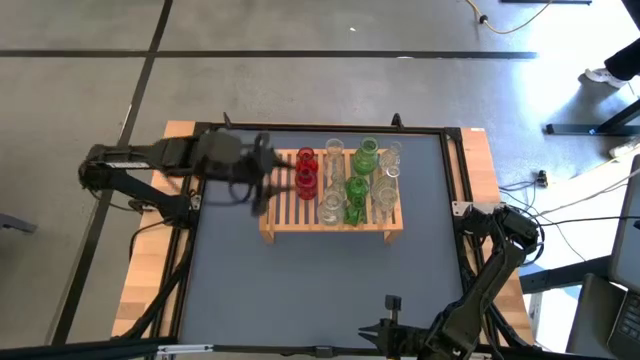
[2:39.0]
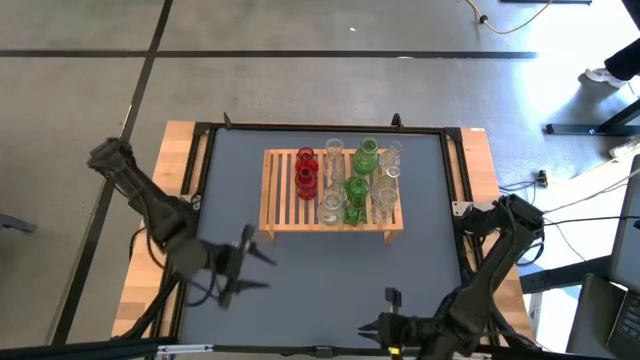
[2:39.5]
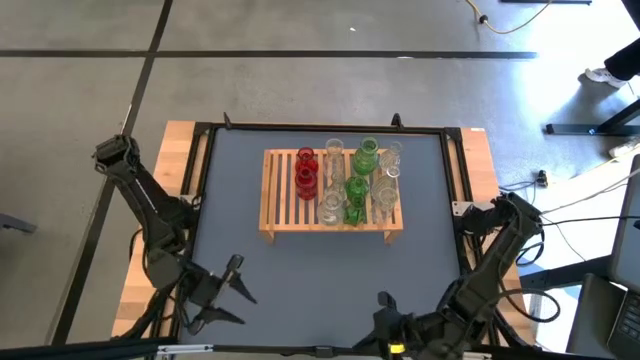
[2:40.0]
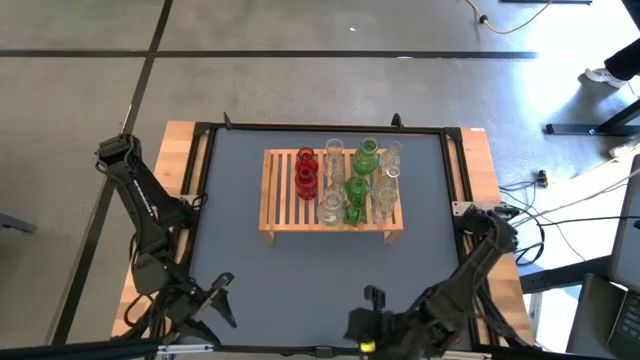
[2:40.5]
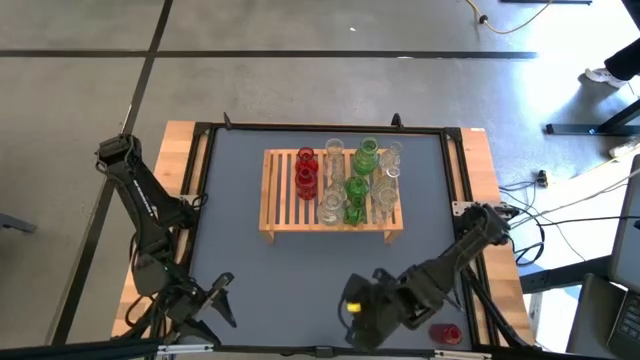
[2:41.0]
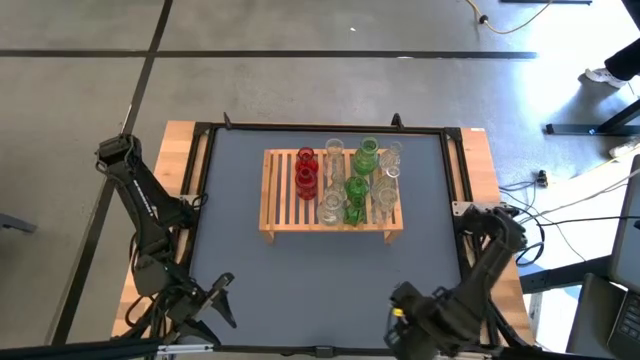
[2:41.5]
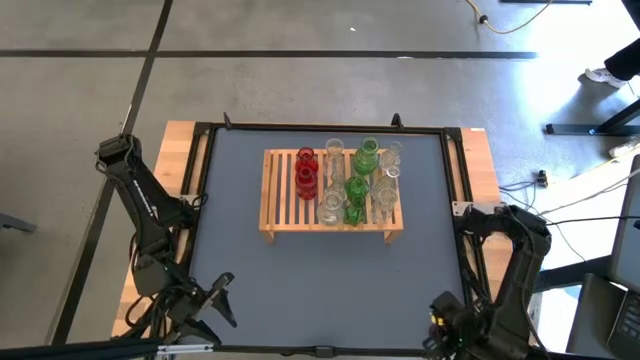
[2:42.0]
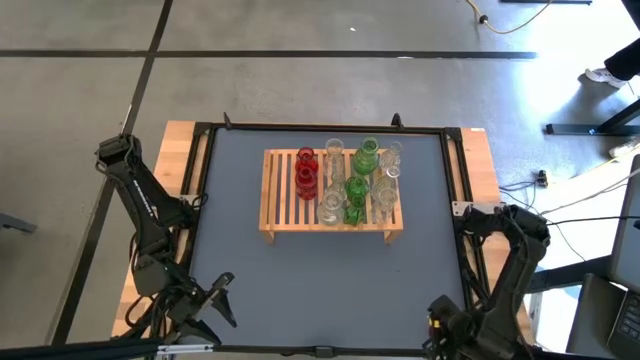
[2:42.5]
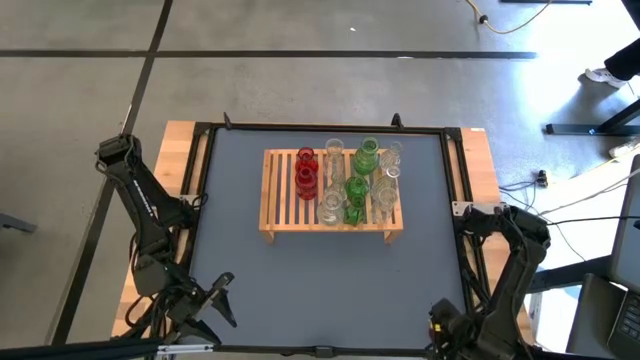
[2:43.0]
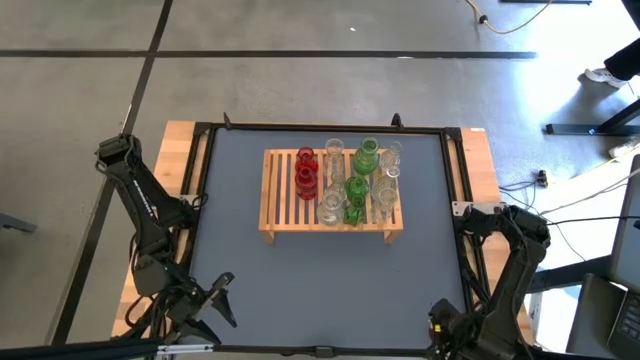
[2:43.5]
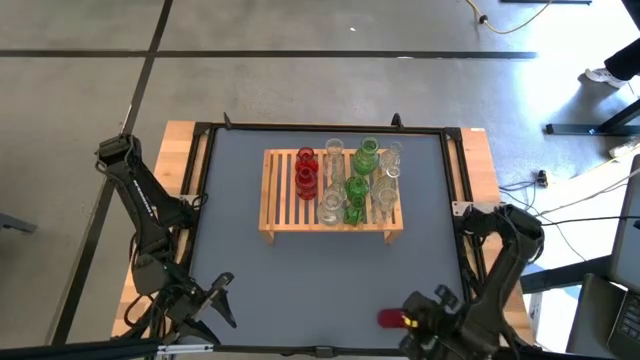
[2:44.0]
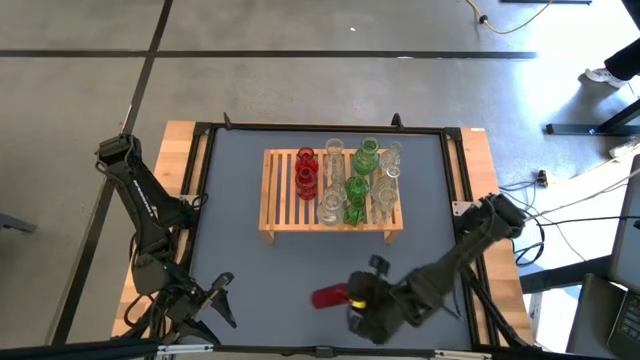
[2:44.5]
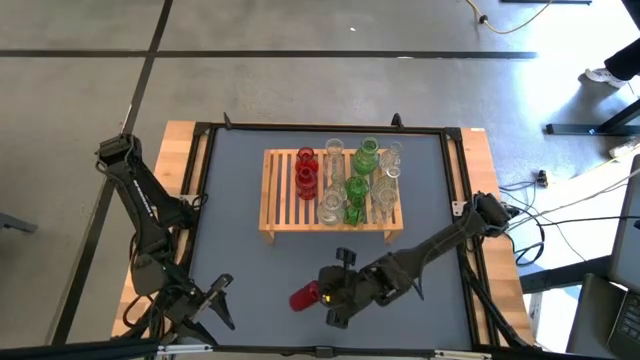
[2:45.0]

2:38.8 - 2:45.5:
Task: sort vases onto shelf
Put the red bottle on the shelf

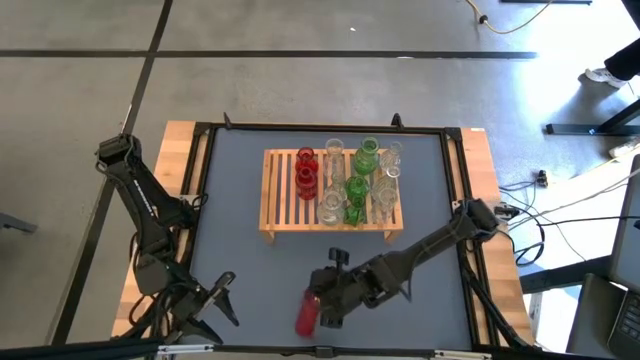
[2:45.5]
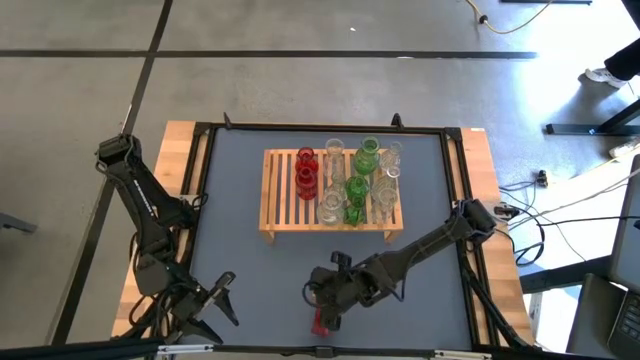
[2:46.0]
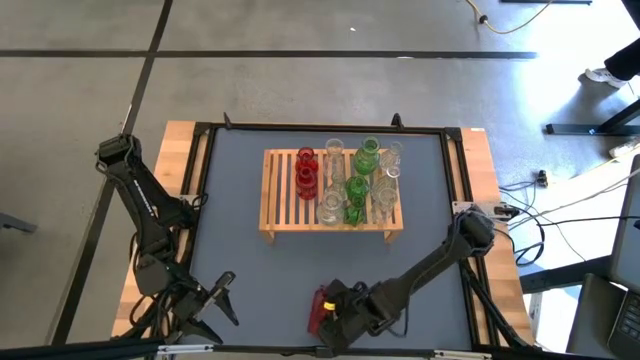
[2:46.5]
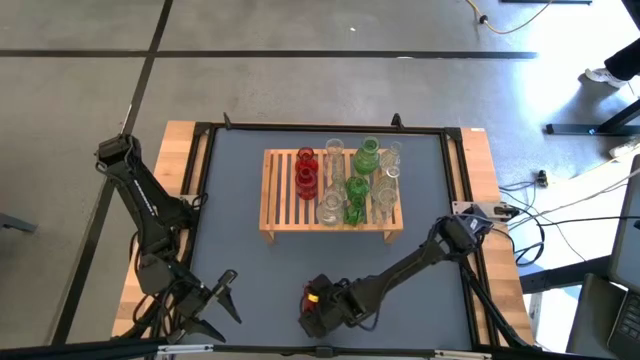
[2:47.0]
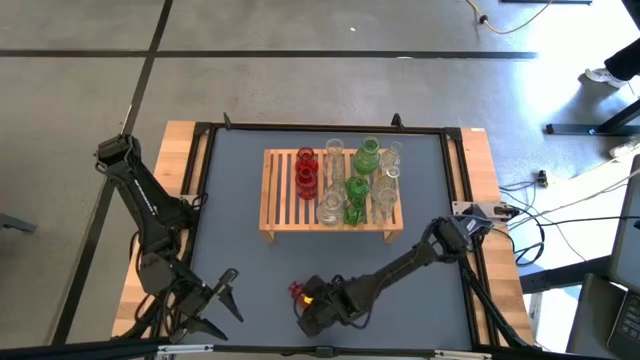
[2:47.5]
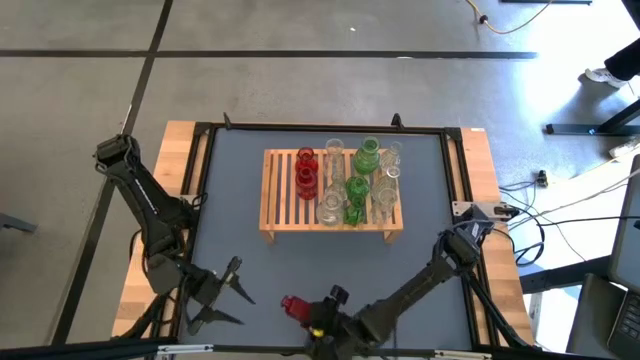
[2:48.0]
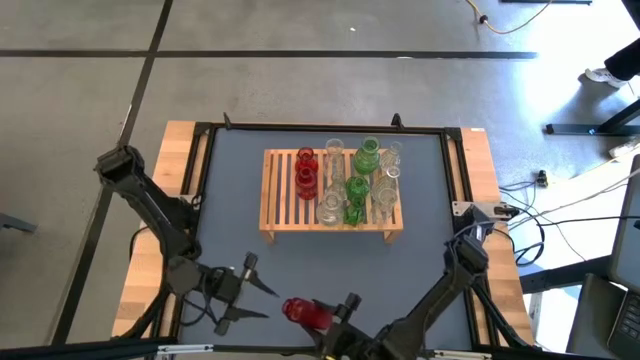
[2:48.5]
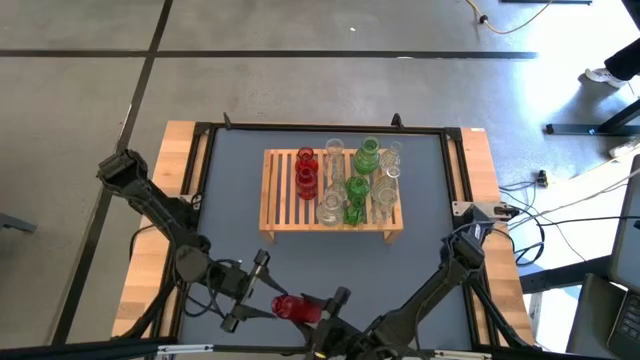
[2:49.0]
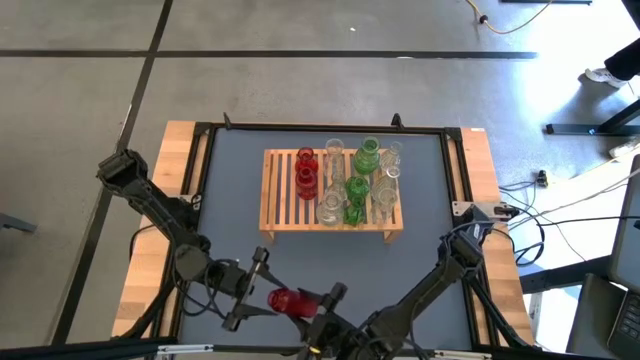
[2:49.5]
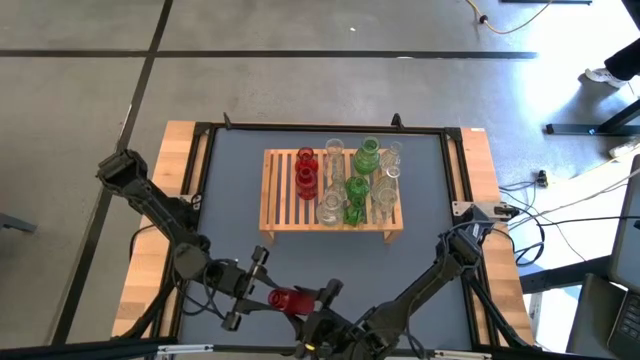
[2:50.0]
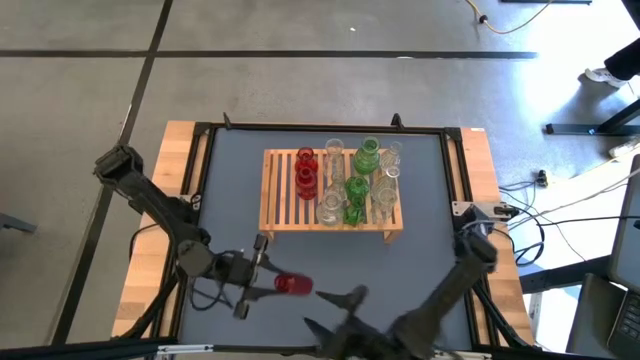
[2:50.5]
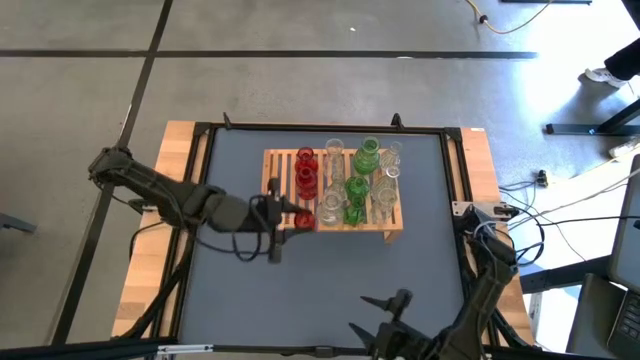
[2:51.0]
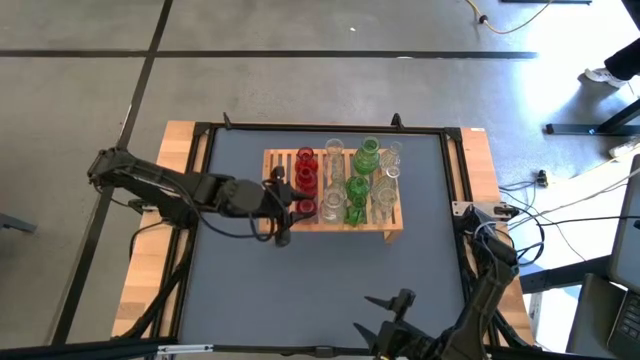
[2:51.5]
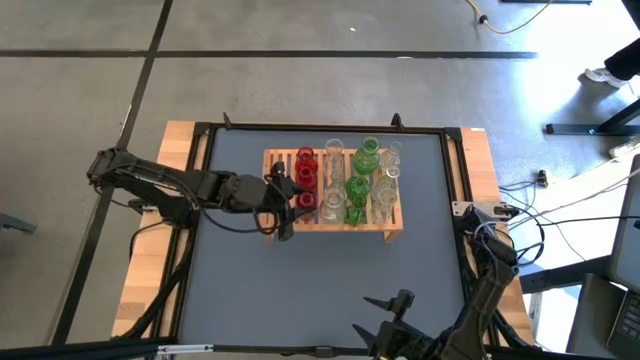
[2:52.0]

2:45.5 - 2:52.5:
Put the red bottle on the shelf

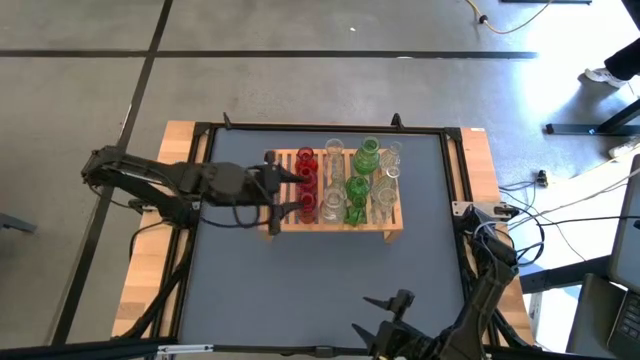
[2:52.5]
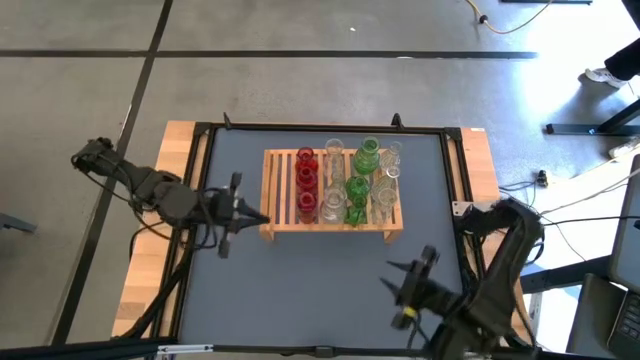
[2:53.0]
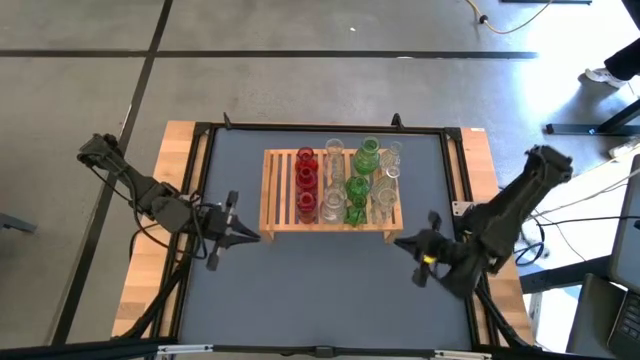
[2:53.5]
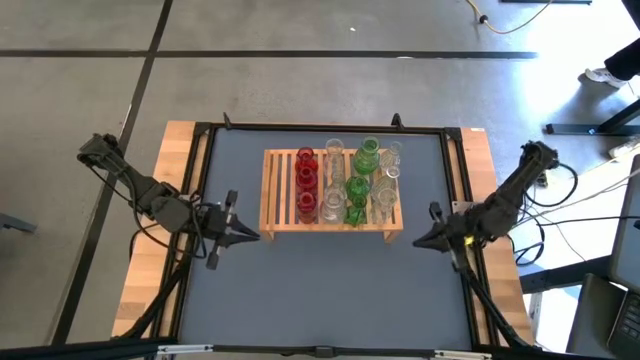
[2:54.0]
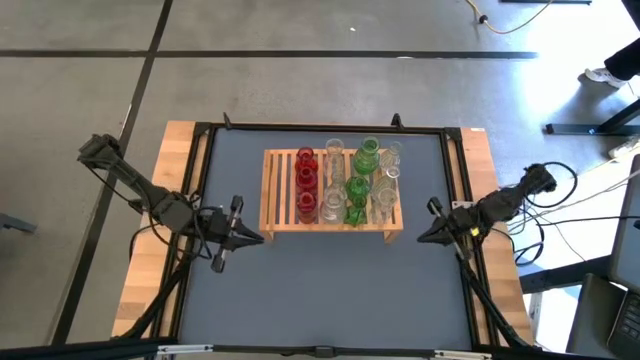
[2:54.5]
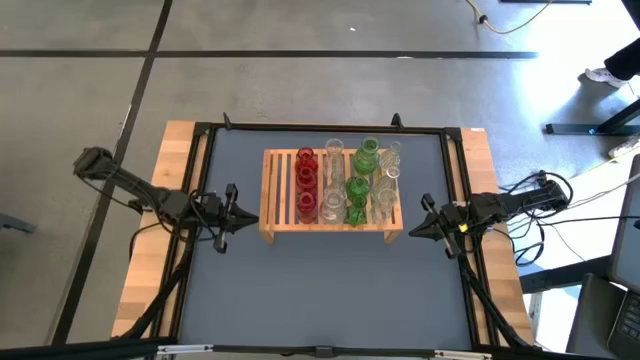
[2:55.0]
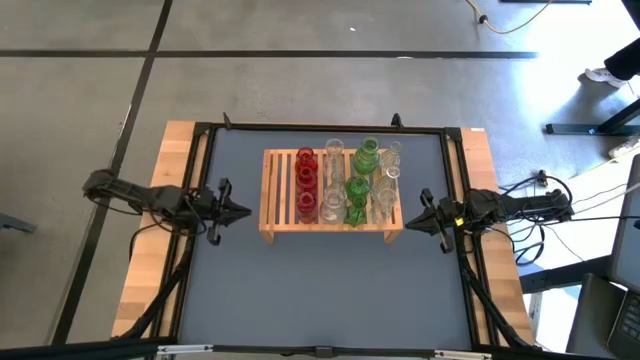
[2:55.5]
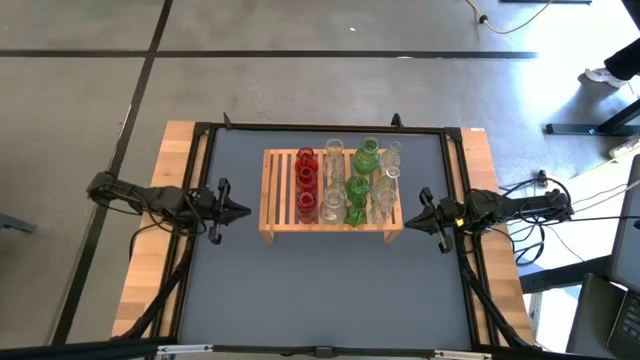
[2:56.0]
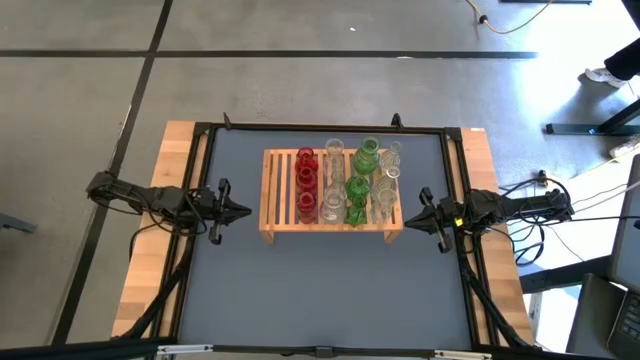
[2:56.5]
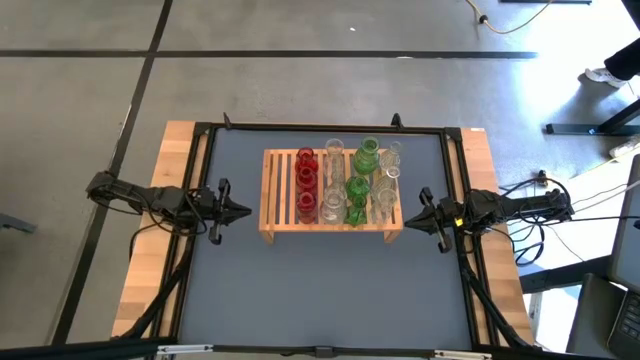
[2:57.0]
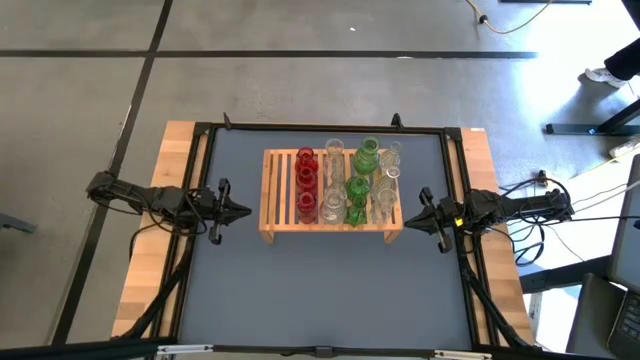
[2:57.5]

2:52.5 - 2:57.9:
Return to home position

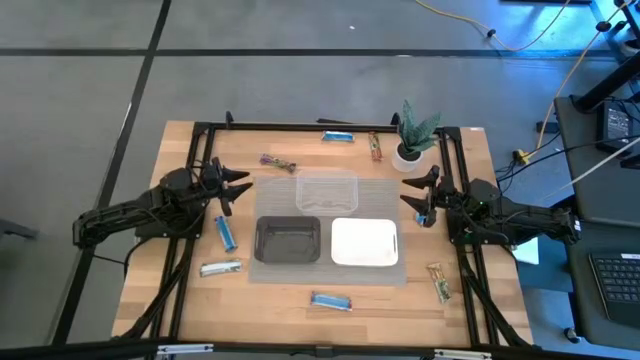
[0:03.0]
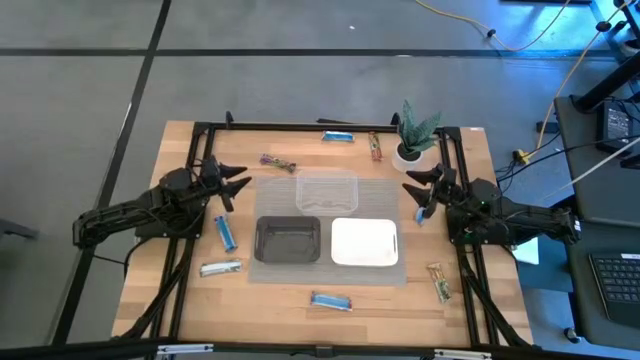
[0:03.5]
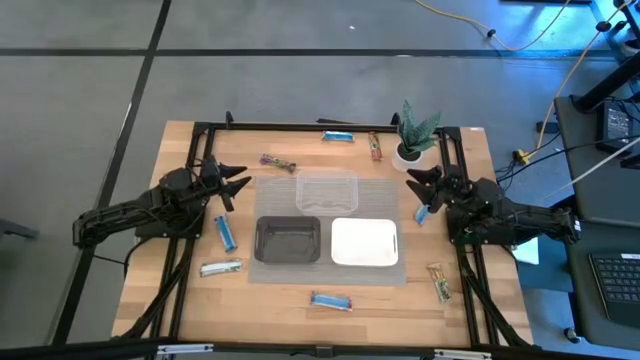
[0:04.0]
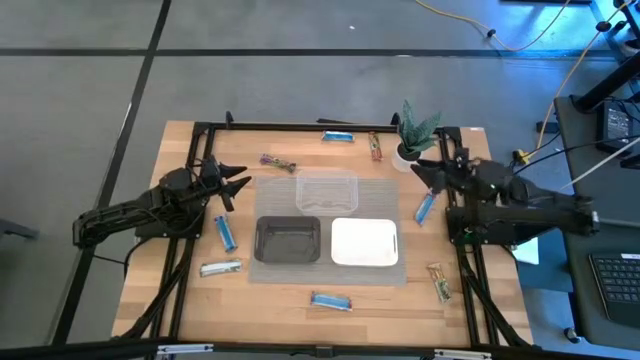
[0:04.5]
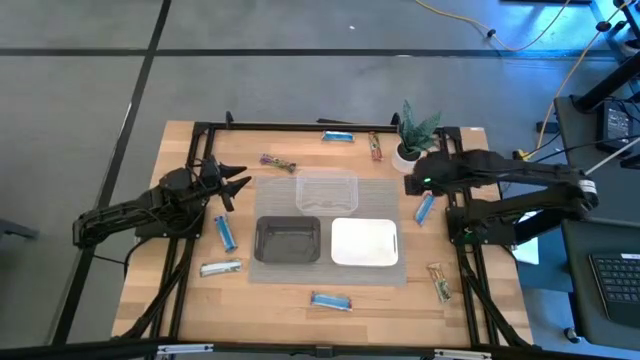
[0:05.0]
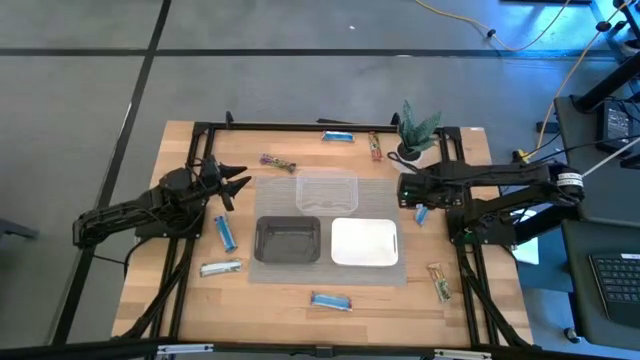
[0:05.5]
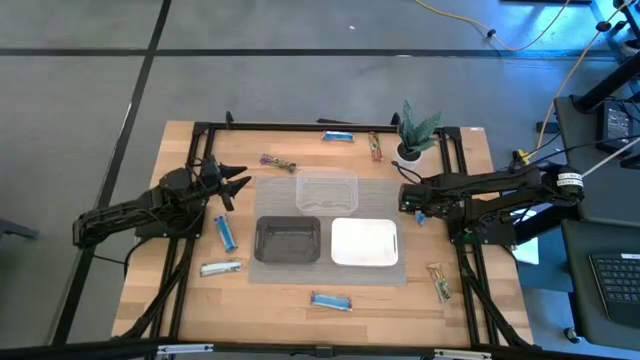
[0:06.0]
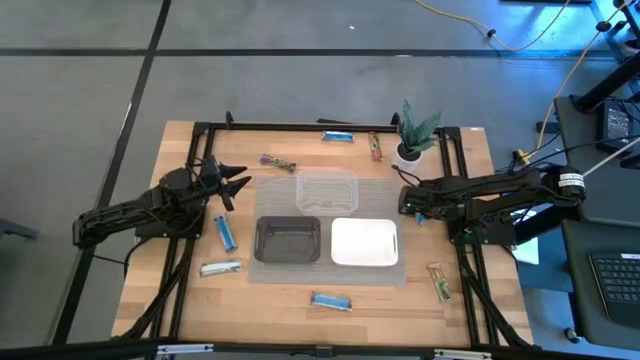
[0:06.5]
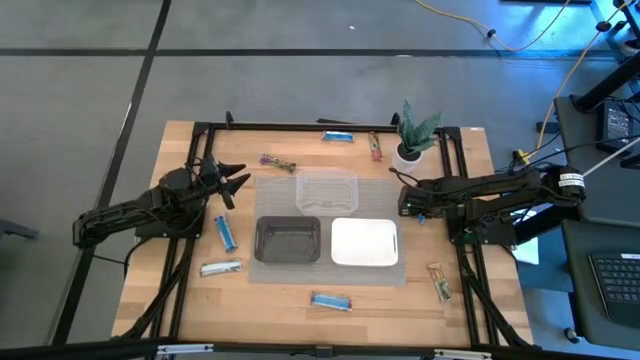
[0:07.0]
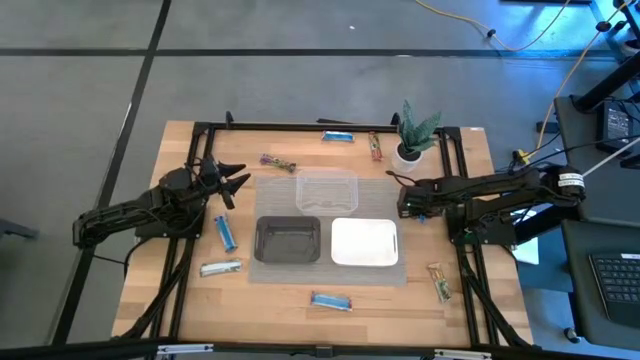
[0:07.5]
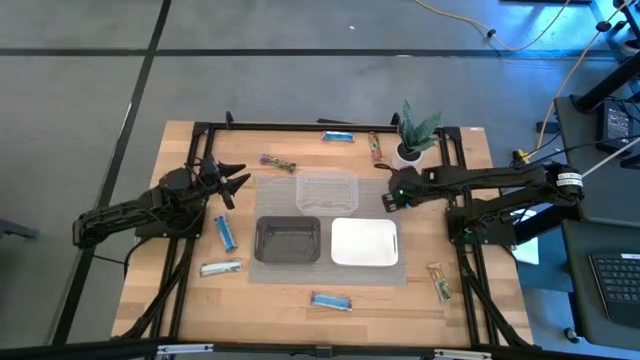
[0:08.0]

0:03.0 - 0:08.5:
Task: Pick and place Granola Bars by type
Put the middle right red granola bar into the transparent bin
